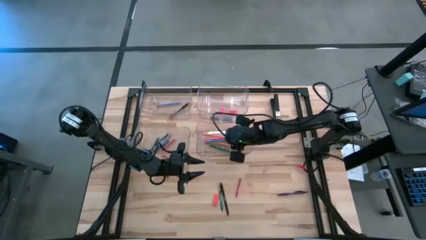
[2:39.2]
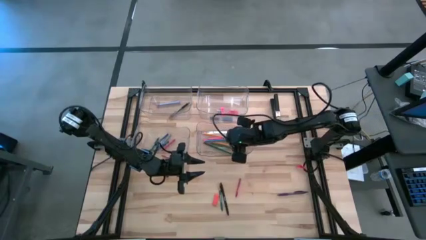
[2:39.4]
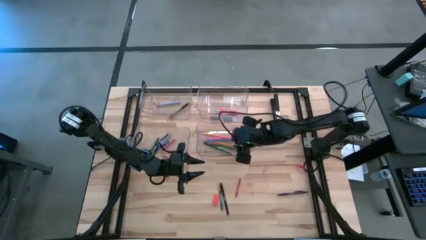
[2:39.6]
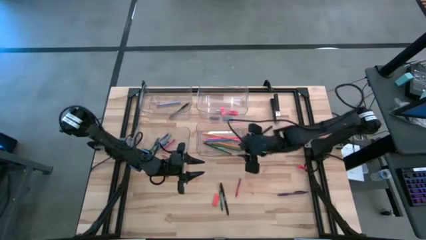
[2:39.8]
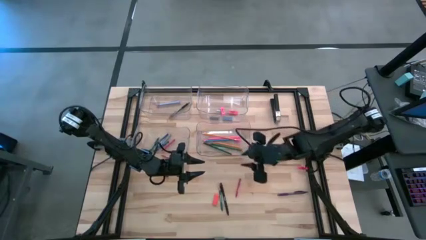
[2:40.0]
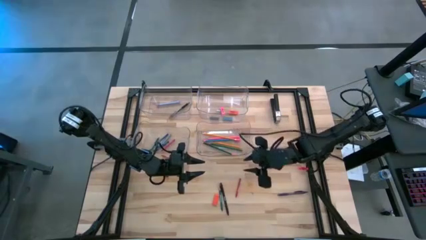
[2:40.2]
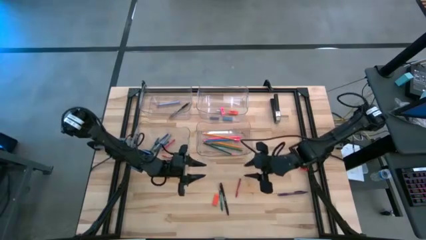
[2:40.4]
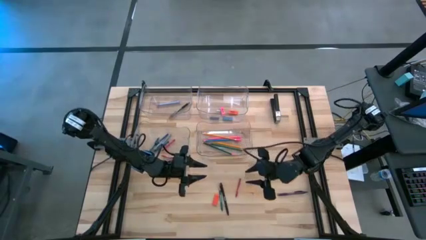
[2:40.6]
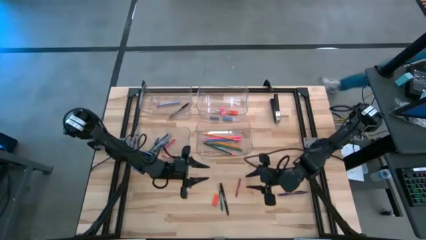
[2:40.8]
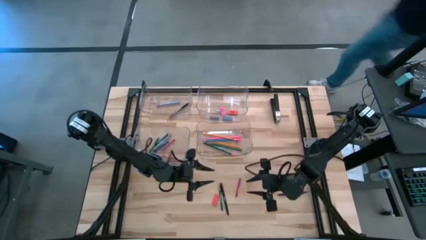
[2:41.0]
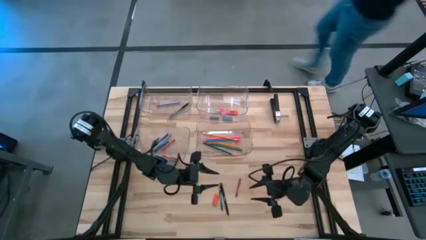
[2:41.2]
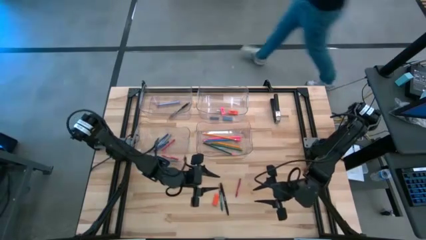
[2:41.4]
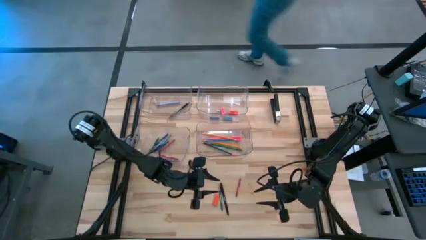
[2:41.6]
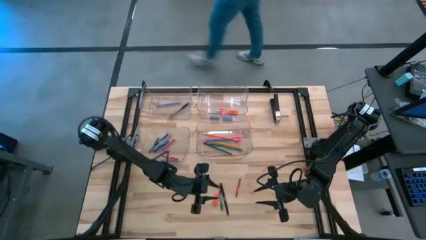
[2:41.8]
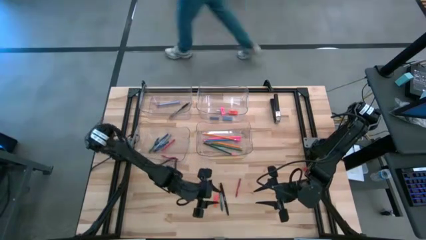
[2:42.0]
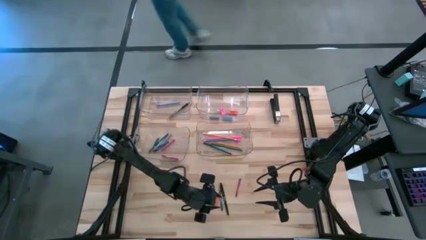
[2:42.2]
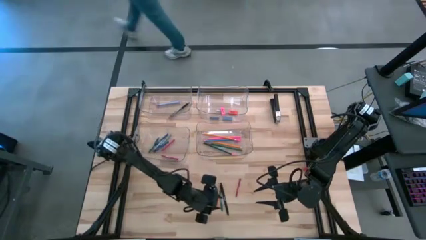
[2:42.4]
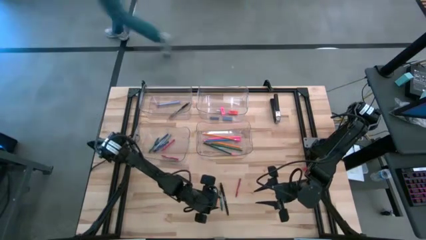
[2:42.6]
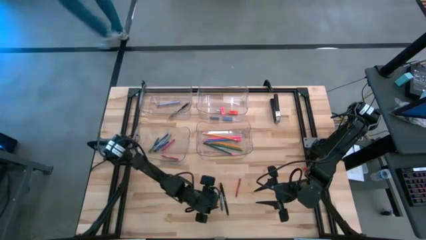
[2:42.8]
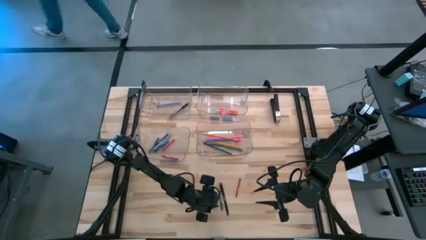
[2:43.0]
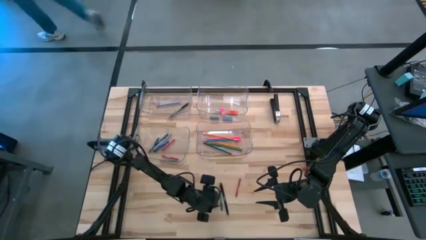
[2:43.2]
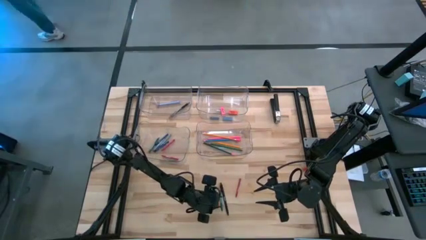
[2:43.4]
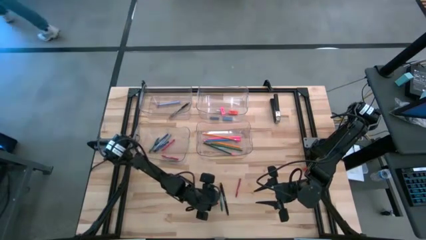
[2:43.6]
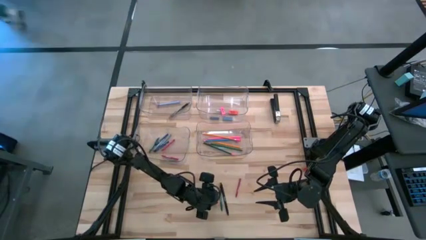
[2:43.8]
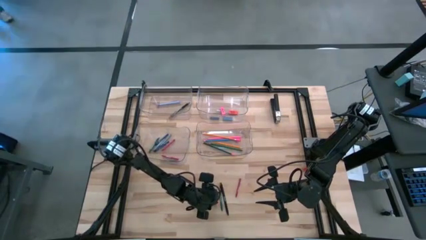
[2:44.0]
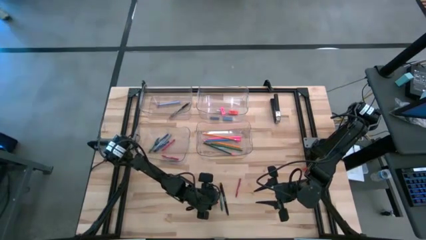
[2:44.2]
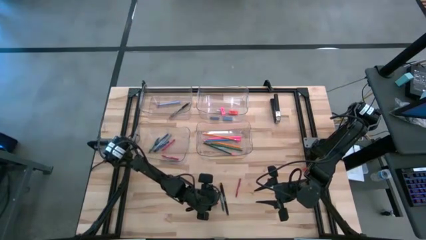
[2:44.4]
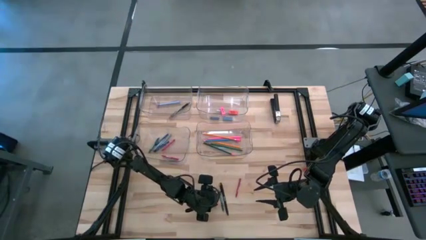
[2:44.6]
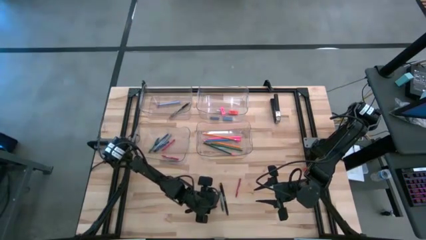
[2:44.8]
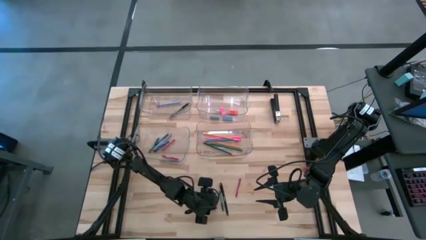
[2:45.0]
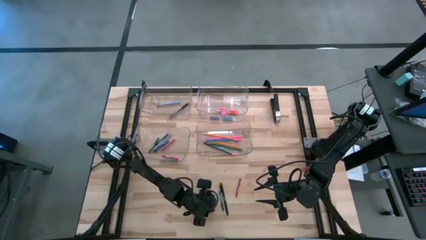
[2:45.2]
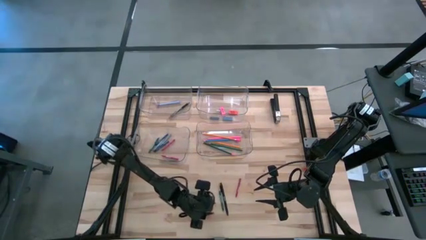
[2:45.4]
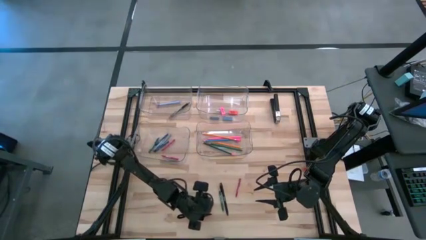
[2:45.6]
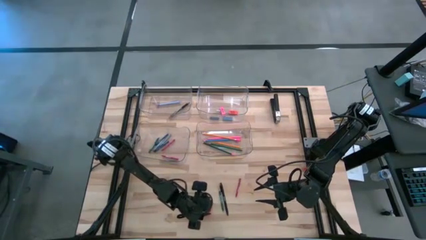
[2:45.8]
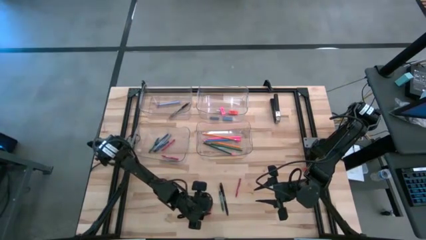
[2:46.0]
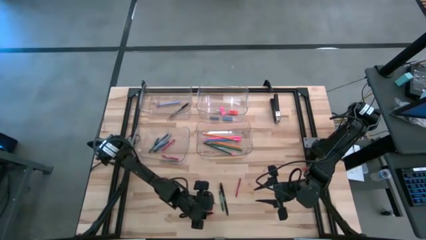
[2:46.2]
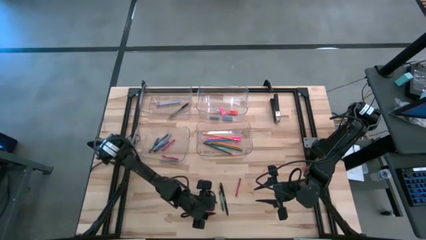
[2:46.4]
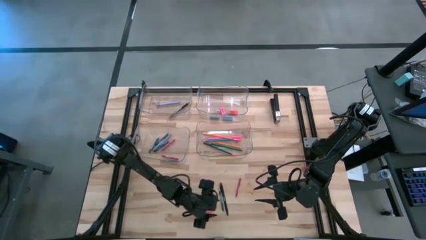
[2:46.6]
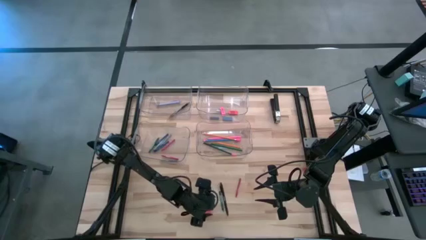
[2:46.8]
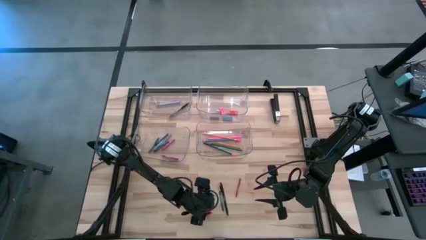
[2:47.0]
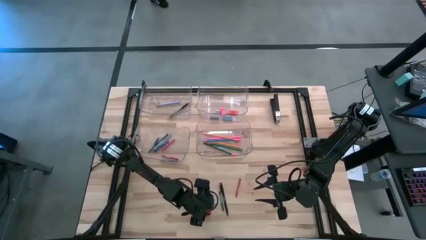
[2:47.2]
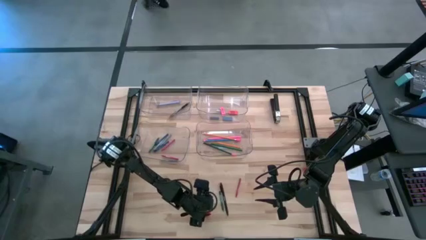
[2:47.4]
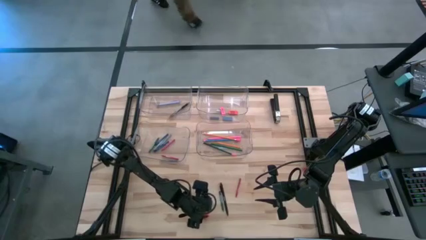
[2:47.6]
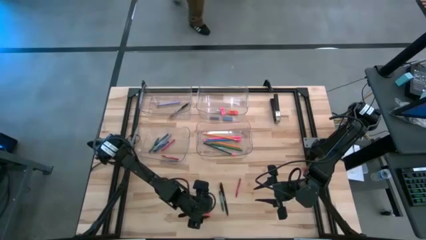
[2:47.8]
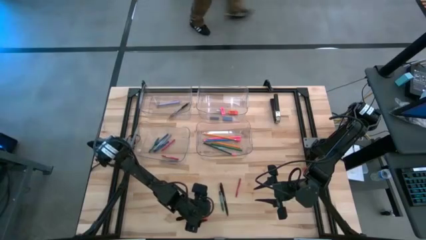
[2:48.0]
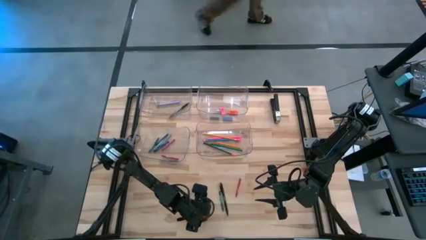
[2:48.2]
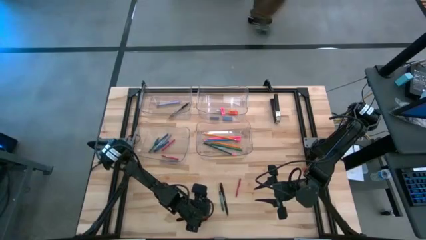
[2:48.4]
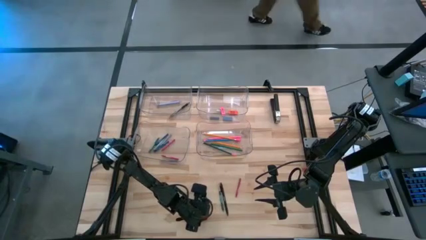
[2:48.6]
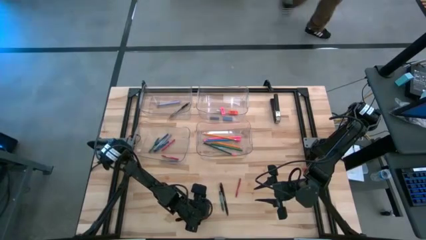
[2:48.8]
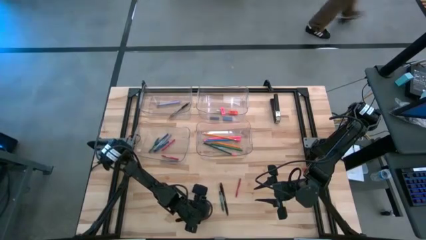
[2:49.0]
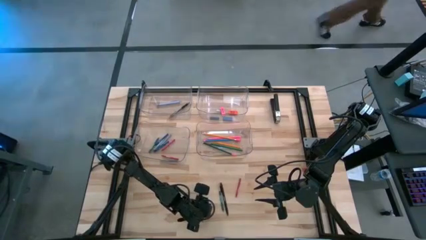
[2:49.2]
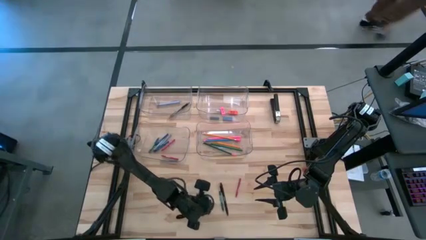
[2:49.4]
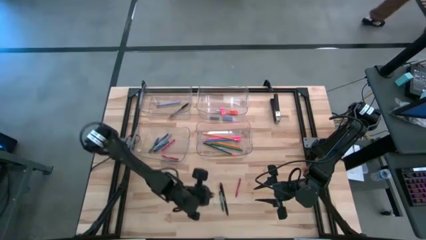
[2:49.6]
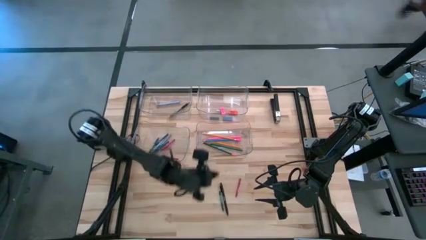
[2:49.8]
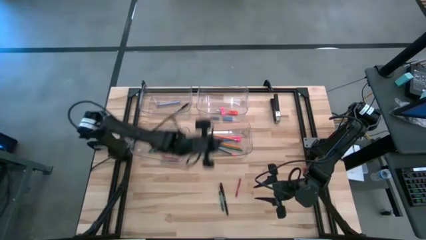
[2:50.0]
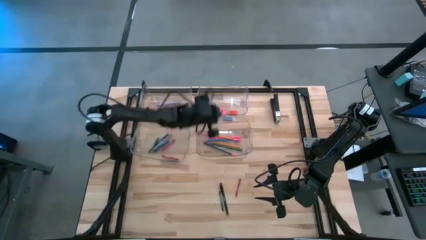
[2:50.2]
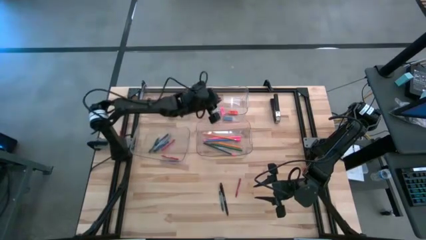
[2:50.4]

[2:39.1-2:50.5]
Task: Sort crayons/erasers/pens/pencils in bins
Put the orange eraser into the top right transparent bin

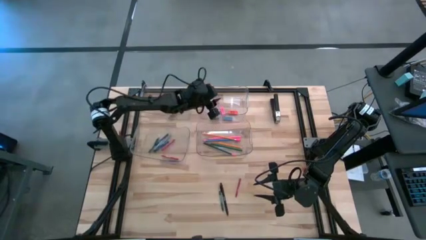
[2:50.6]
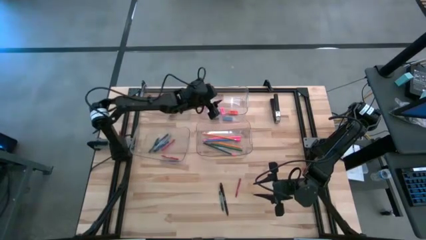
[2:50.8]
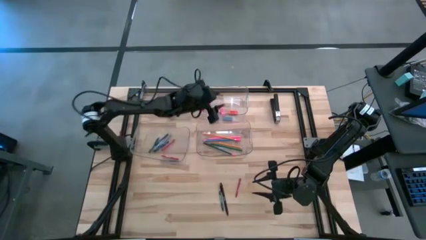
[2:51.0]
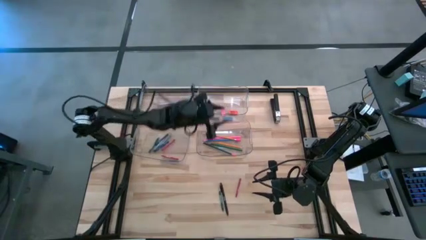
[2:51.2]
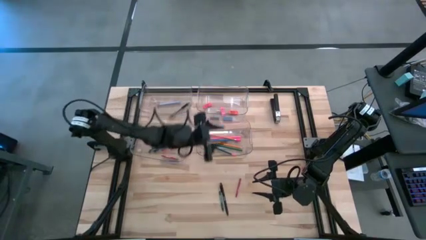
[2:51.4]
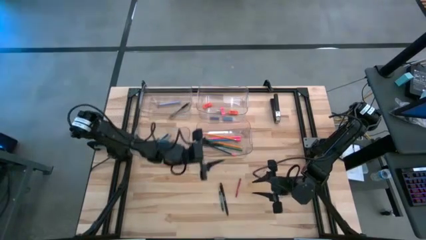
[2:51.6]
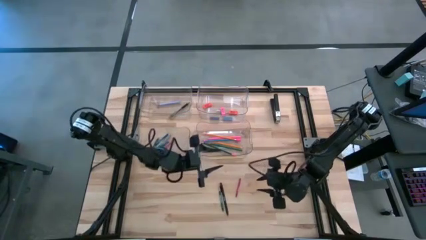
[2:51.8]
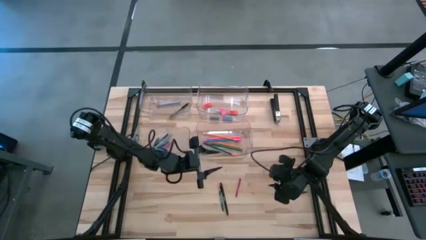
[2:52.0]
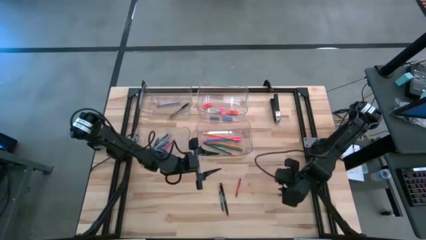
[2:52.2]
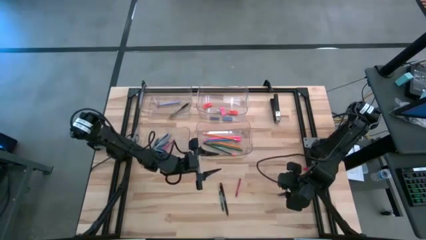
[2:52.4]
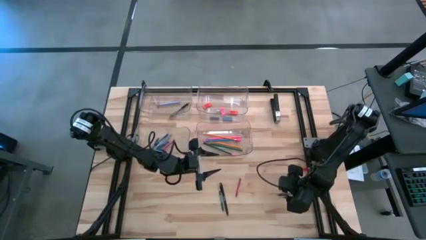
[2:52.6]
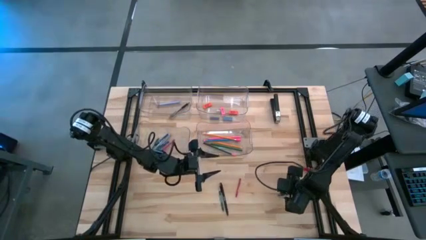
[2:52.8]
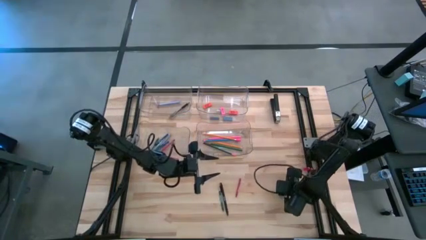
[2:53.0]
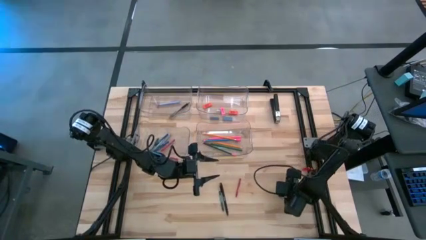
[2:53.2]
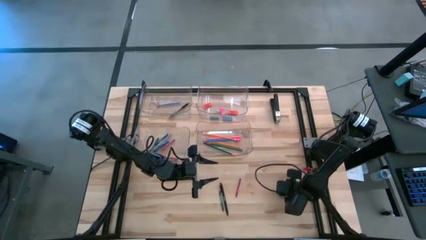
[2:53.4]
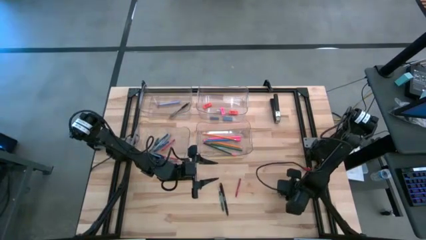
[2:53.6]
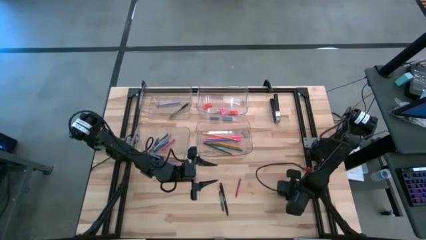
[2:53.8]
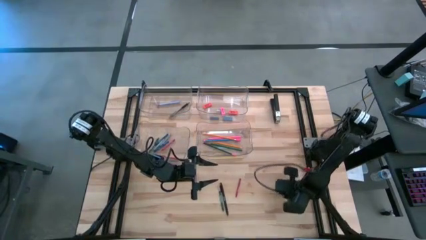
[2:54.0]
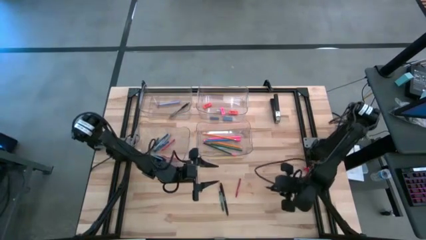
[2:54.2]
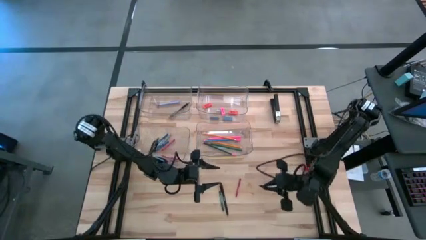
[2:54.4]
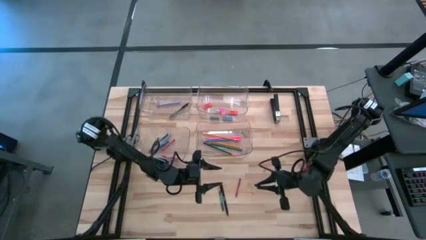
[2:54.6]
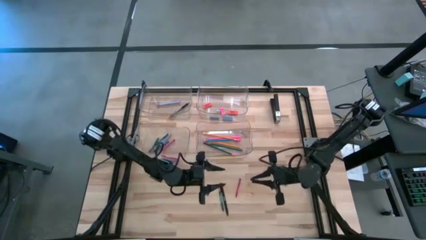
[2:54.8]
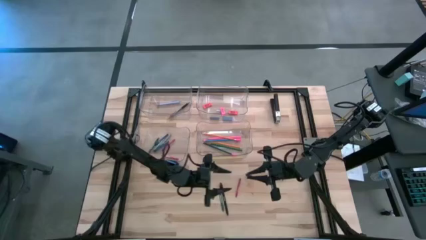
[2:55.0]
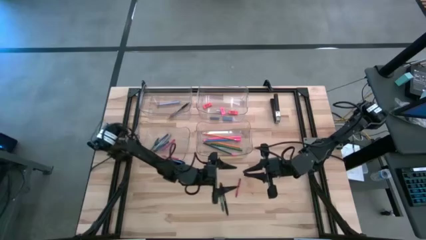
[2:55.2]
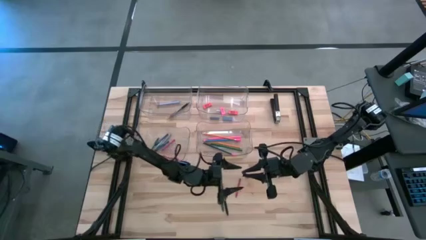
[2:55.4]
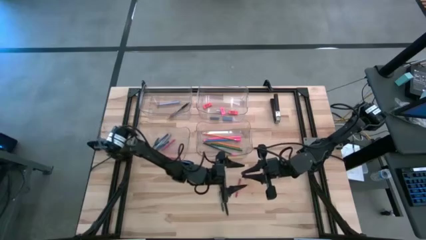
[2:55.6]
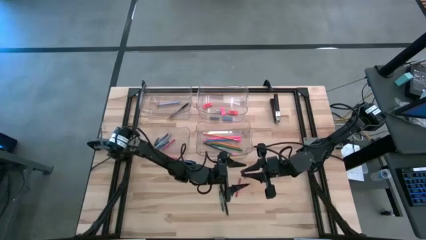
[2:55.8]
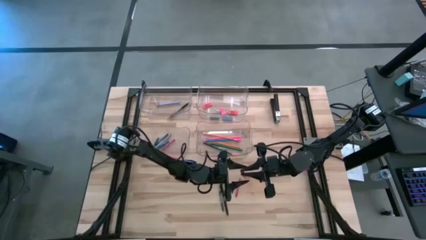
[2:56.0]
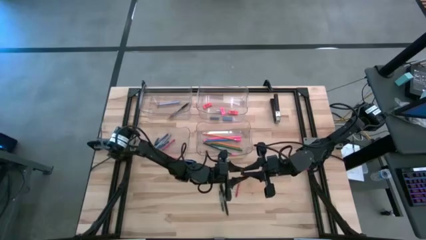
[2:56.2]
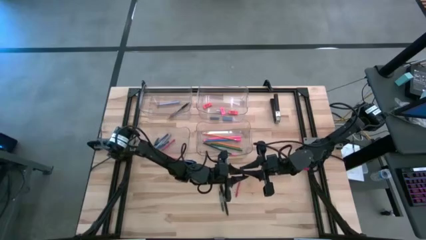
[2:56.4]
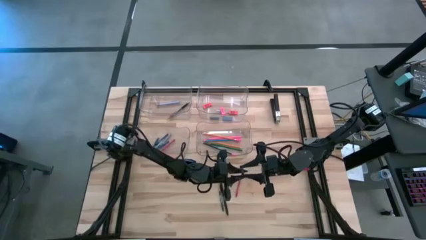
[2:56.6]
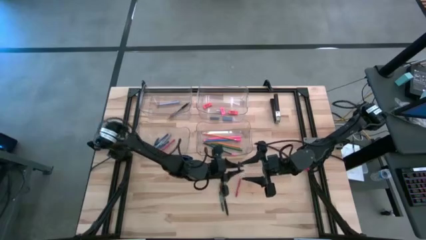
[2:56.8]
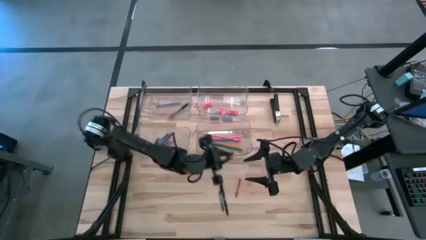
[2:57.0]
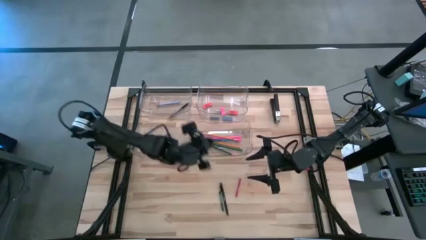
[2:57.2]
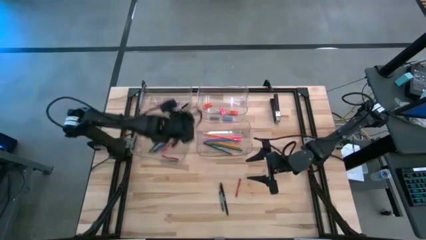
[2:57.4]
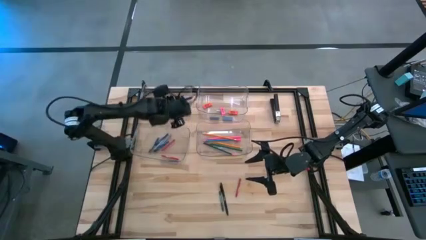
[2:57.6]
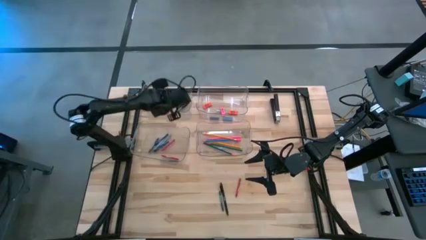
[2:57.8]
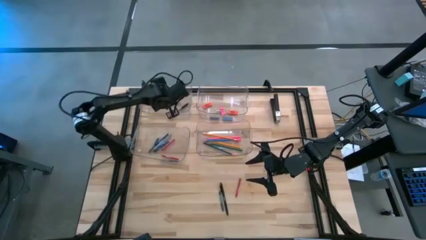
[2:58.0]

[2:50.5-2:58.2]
Put the violet ball pen into the top left transparent bin
